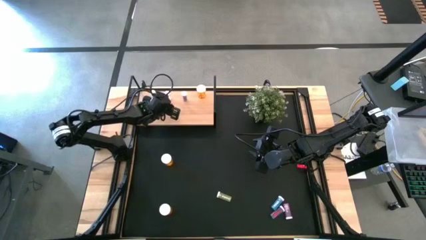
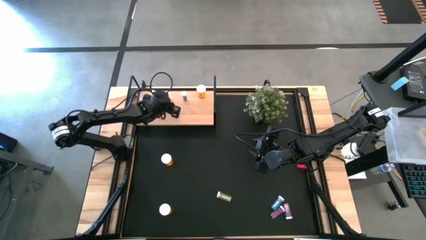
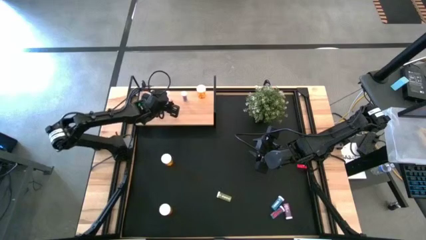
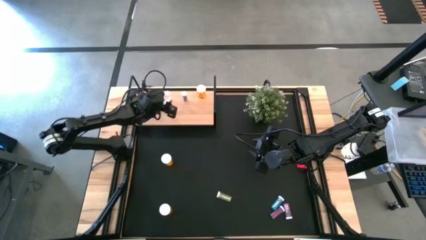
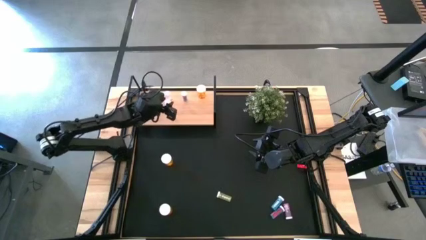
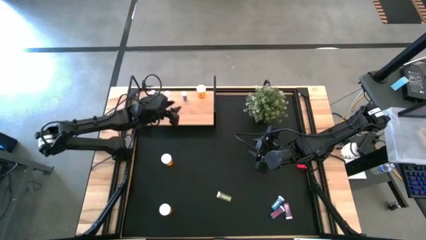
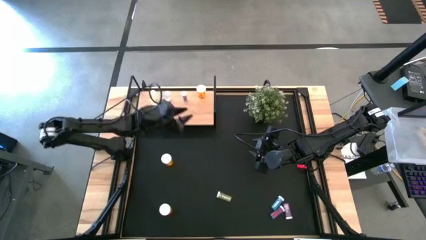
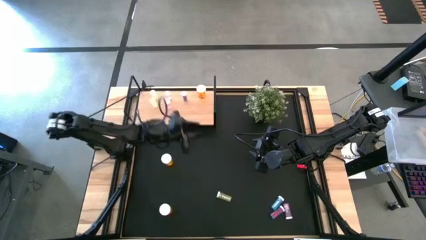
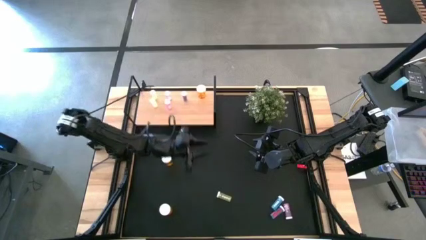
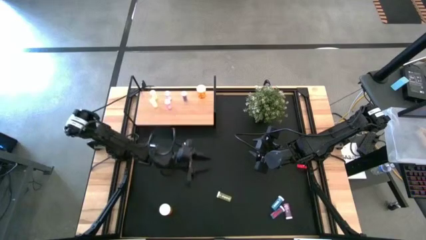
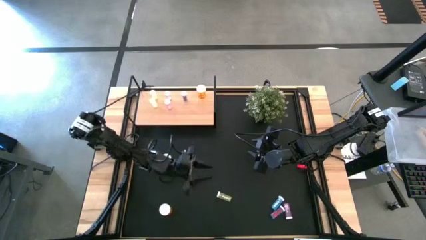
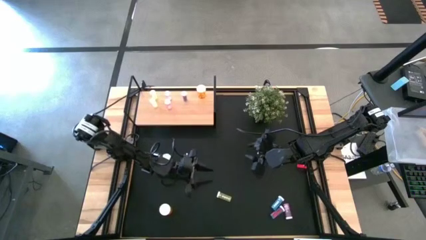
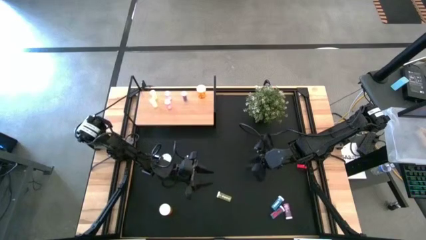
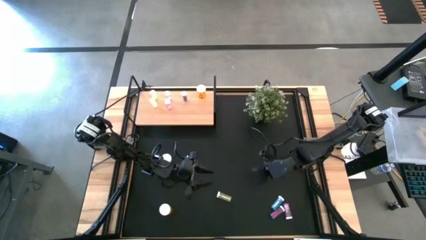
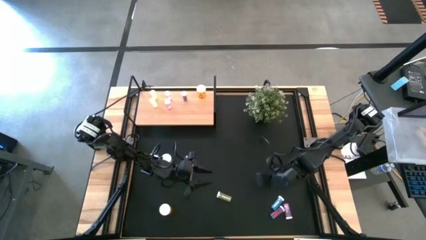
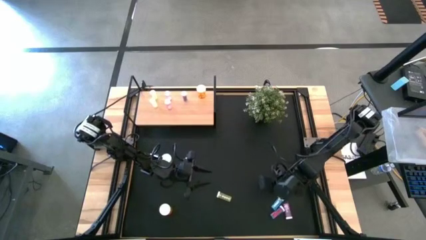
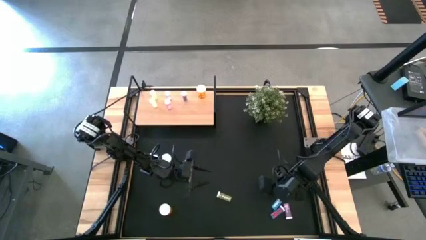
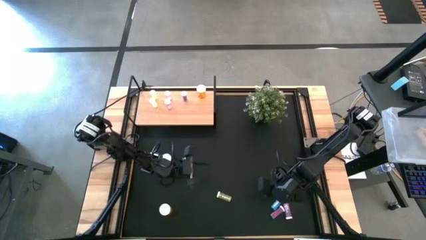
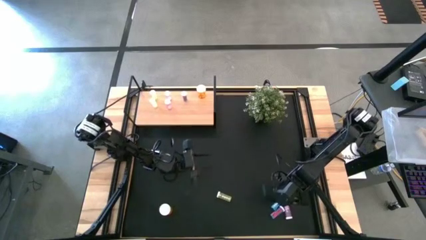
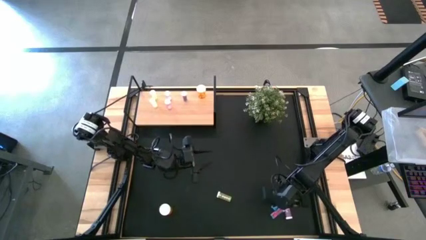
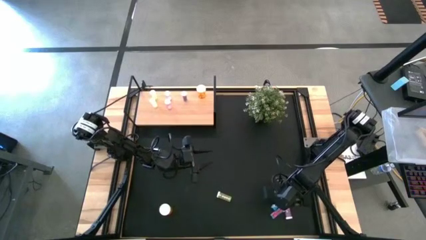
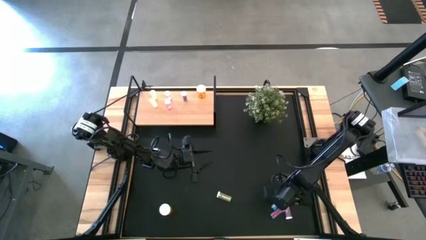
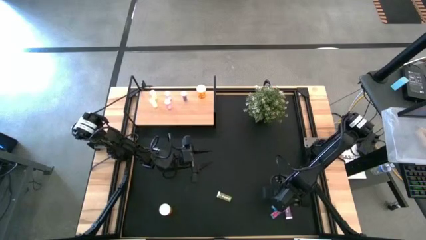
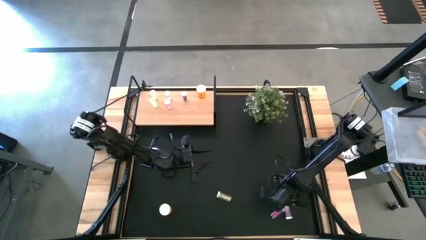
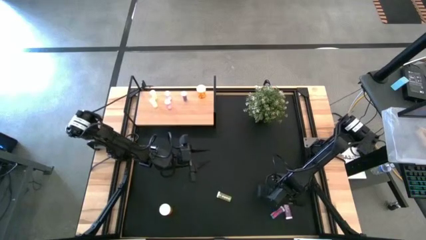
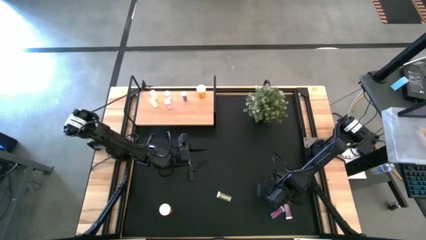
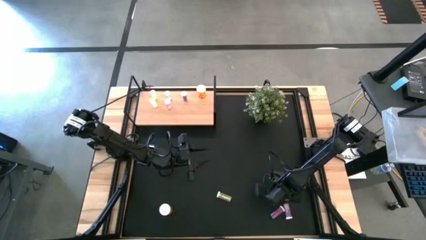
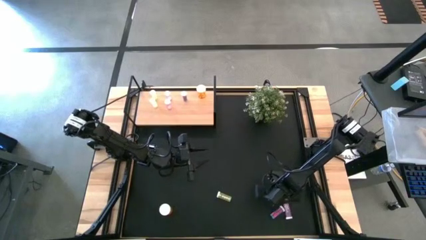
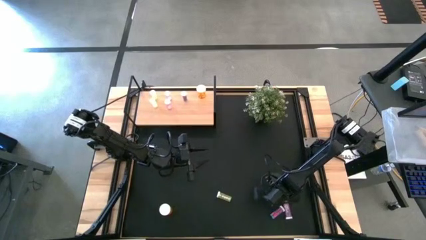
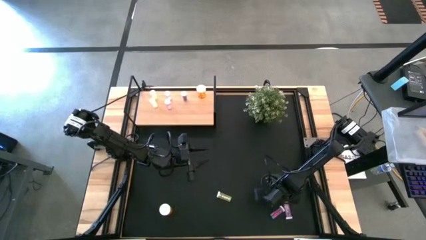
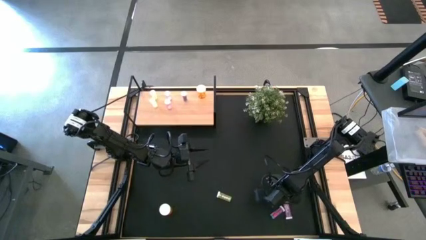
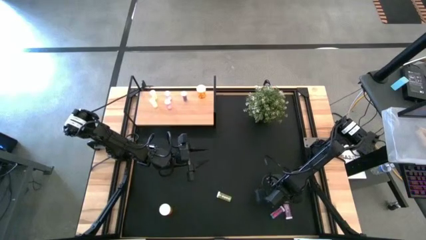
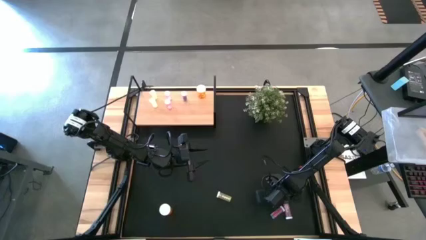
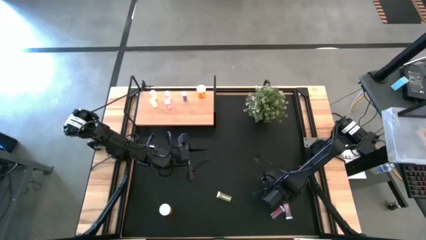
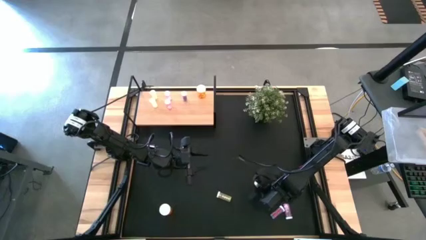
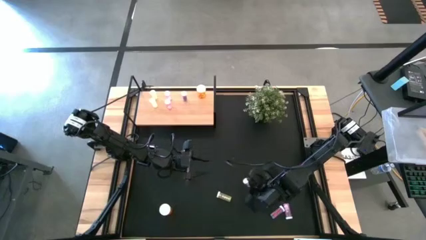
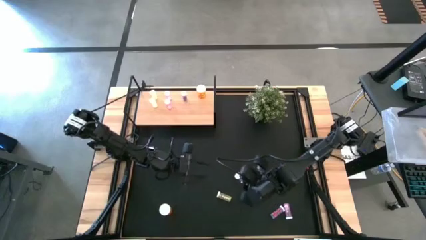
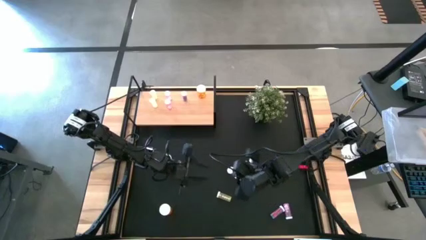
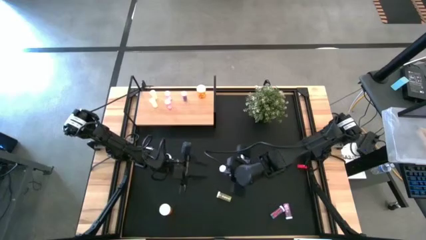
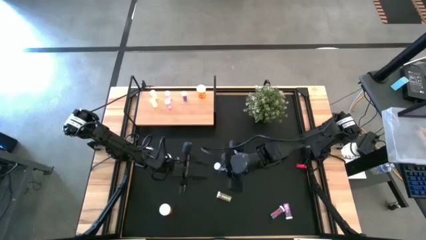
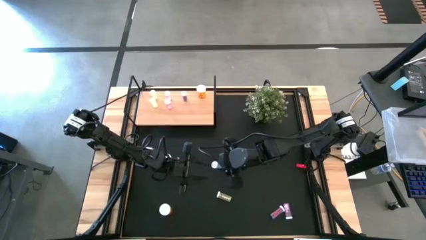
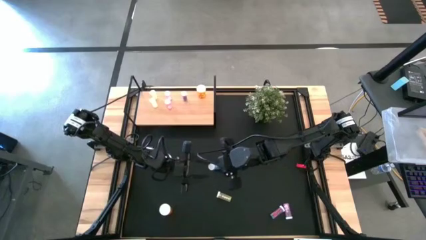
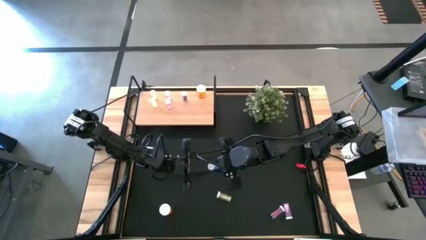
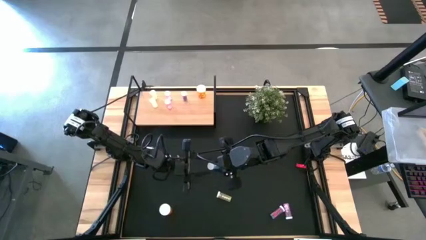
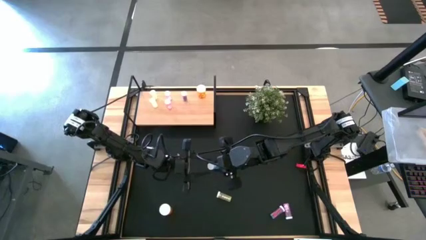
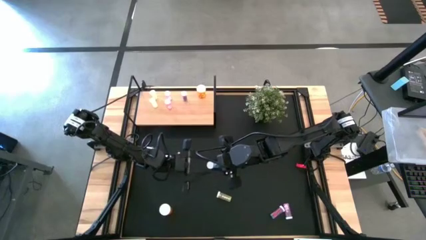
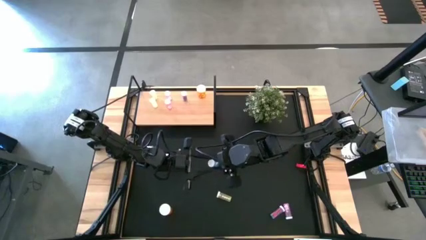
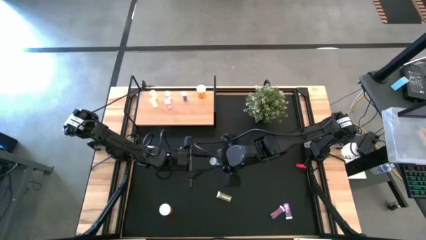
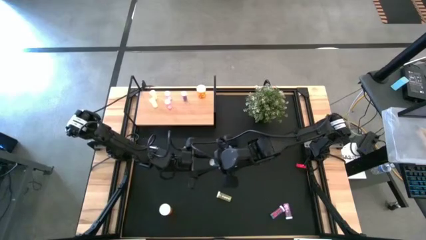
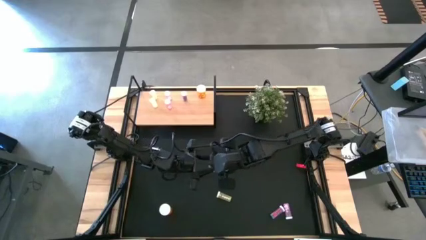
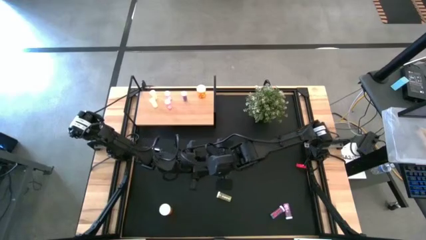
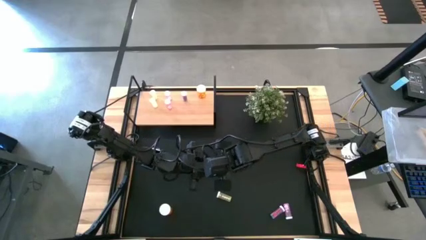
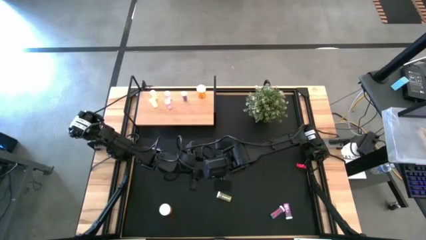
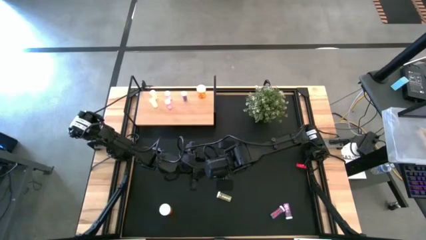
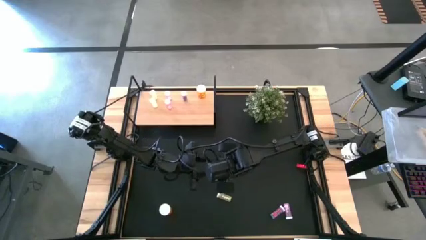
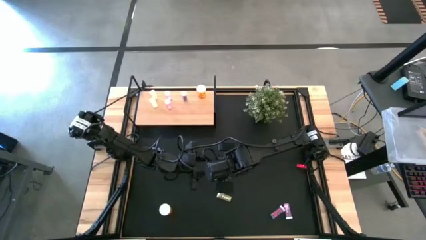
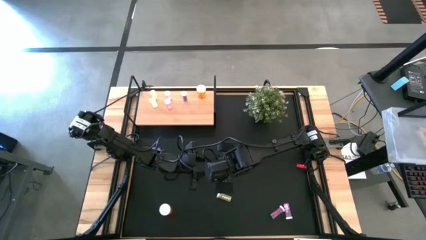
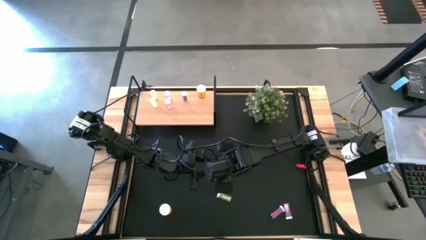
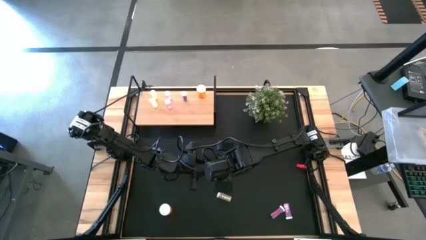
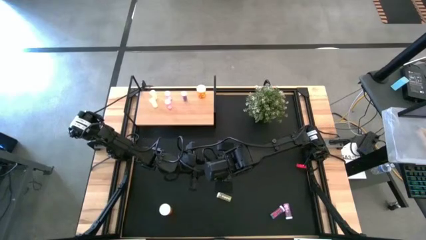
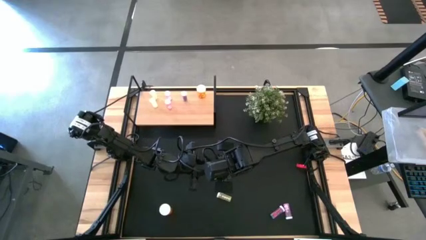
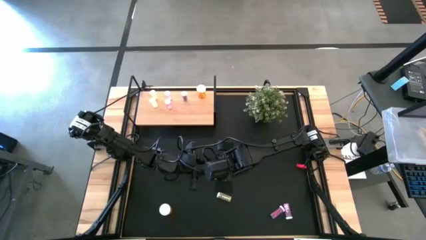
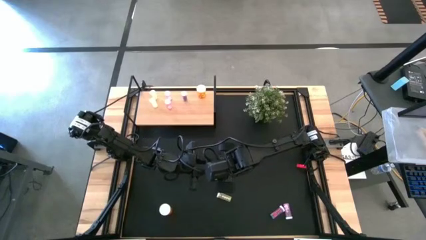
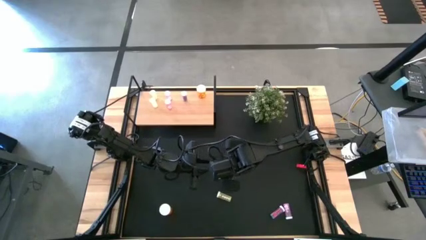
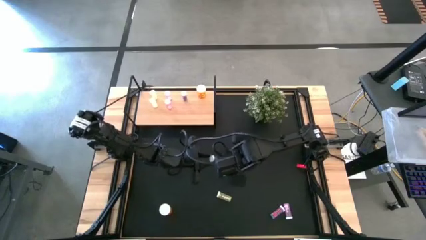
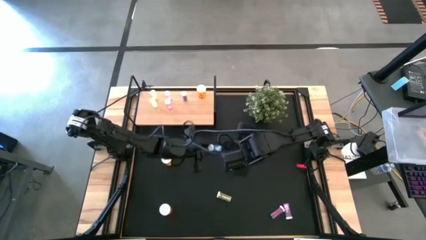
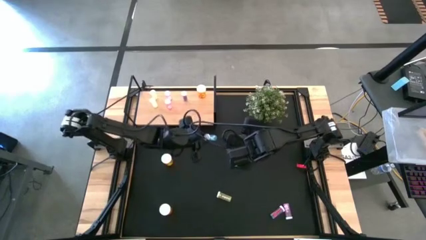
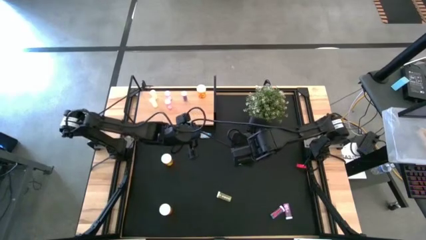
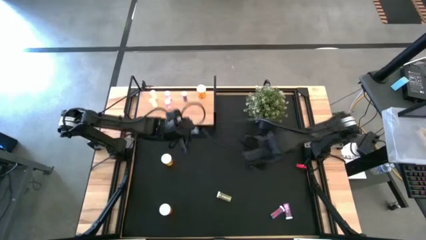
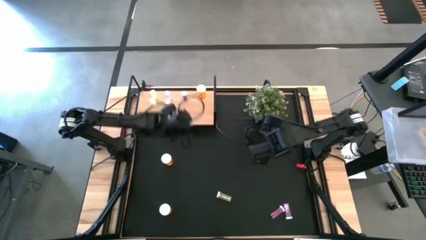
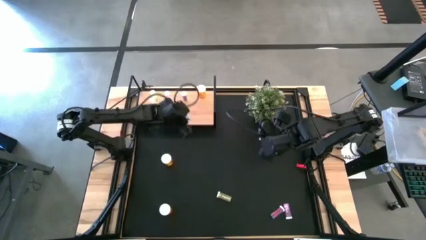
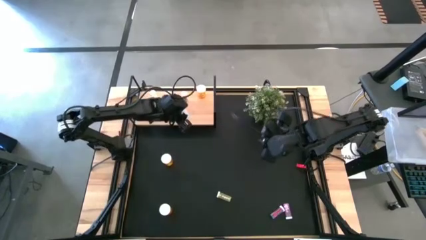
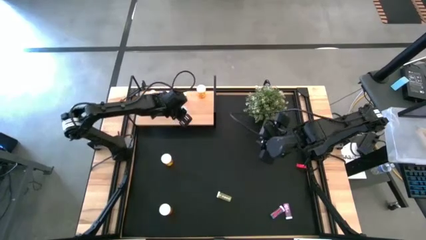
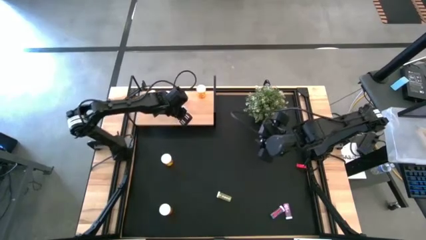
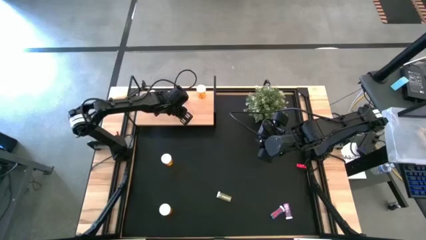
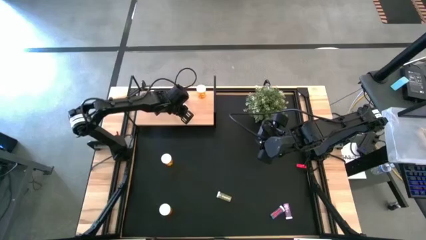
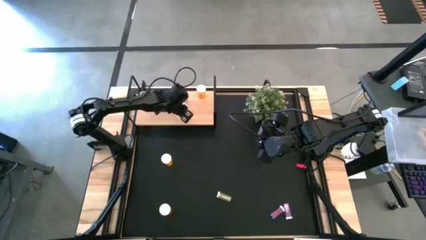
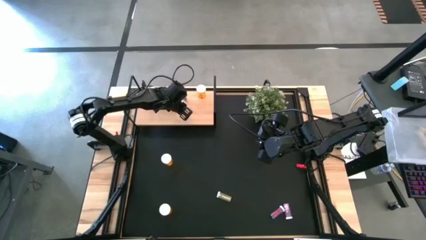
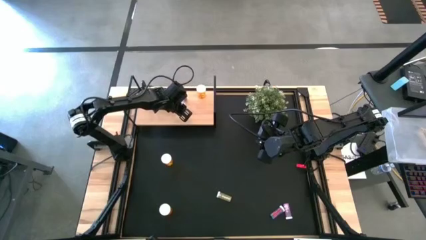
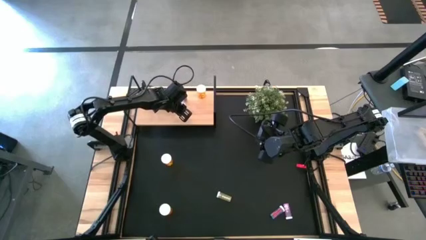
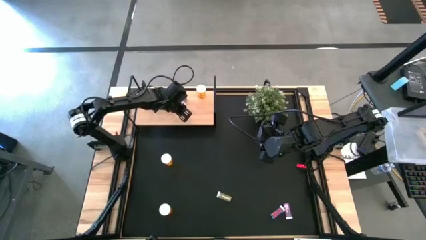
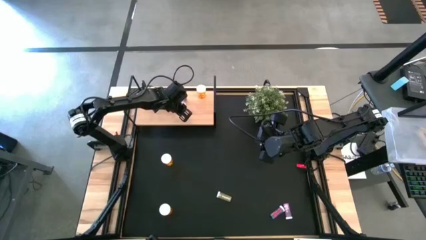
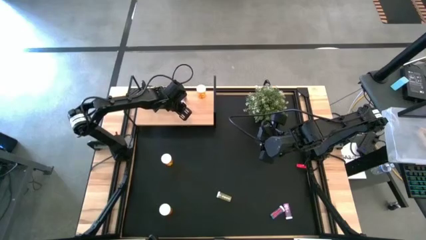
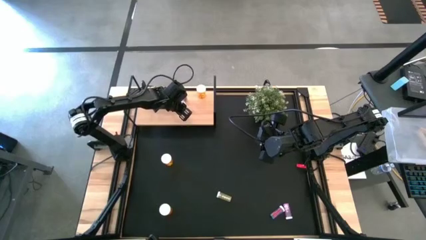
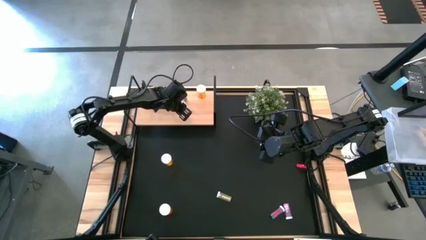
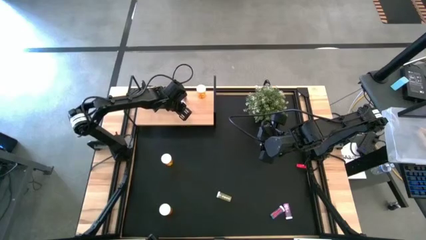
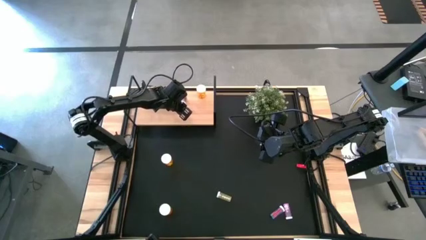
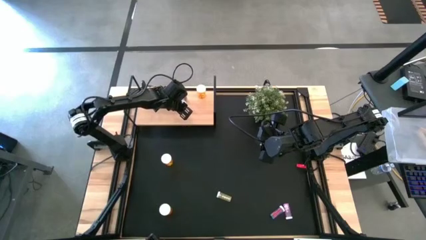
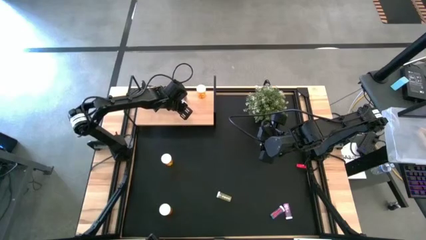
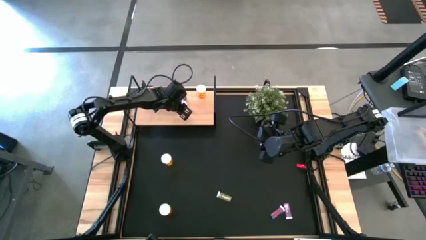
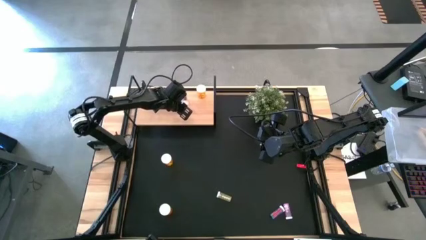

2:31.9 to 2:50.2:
Task: Pick and place medicine bottles onto shelf by color
Put the top blue medicine bottle on the shelf aligned with the other blue medicine bottle
